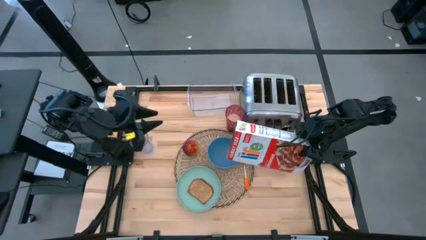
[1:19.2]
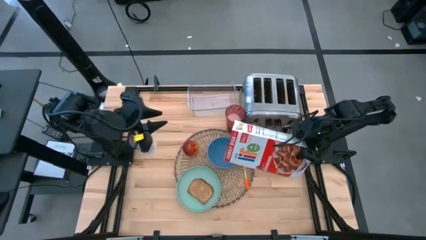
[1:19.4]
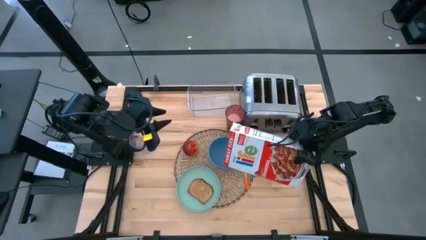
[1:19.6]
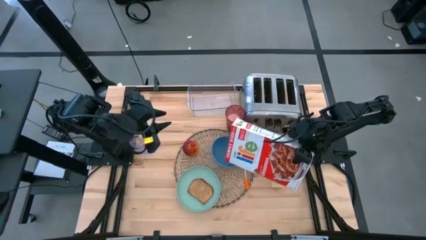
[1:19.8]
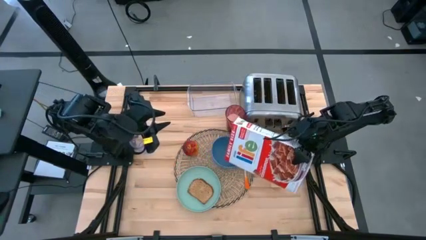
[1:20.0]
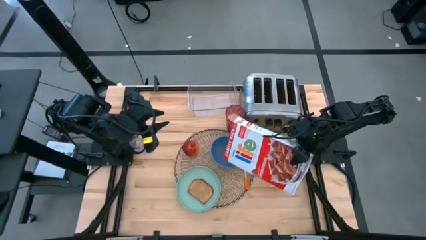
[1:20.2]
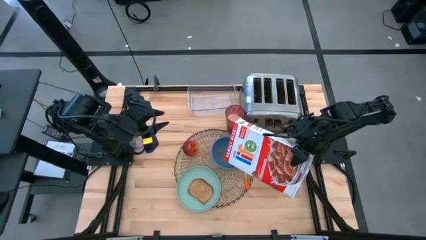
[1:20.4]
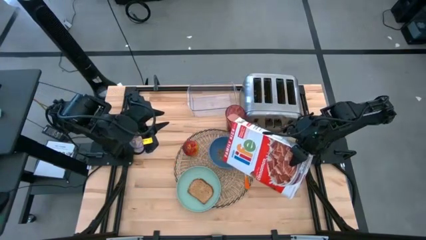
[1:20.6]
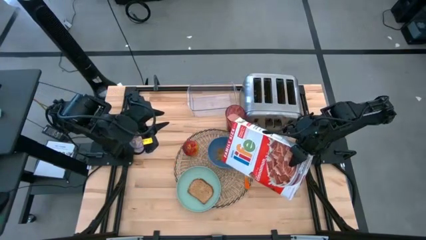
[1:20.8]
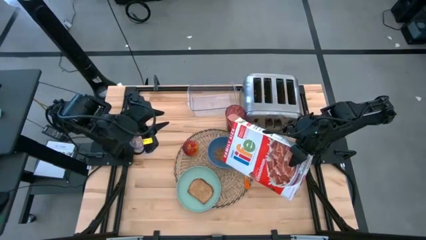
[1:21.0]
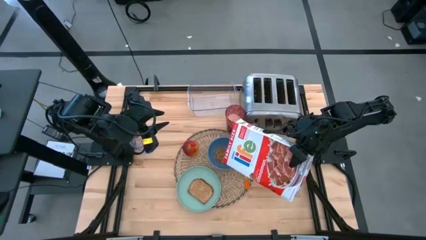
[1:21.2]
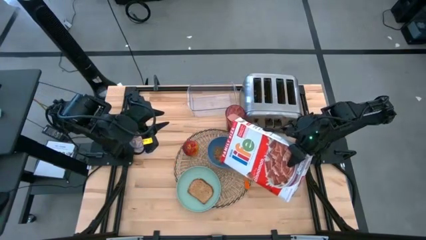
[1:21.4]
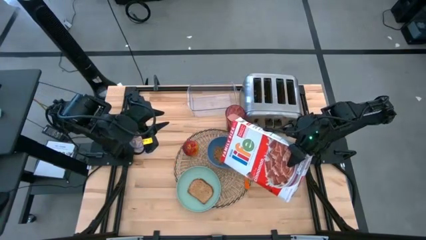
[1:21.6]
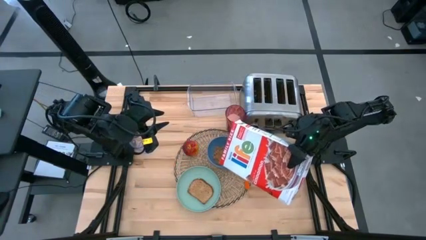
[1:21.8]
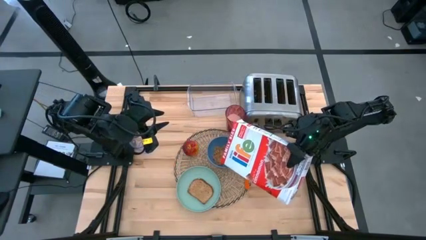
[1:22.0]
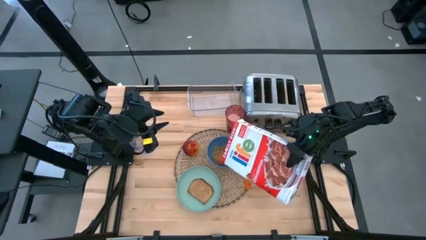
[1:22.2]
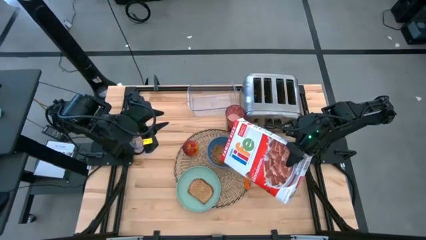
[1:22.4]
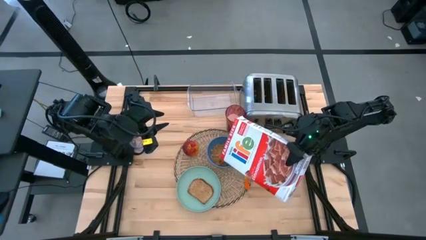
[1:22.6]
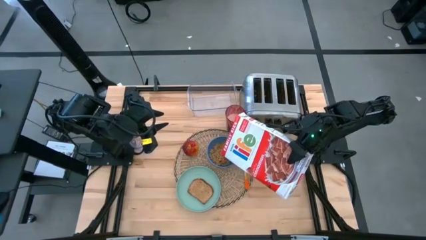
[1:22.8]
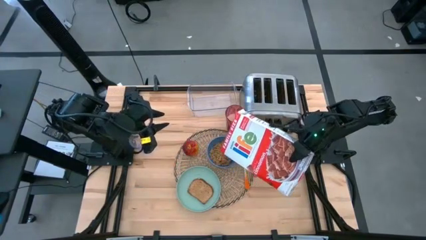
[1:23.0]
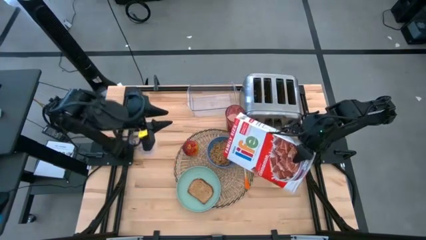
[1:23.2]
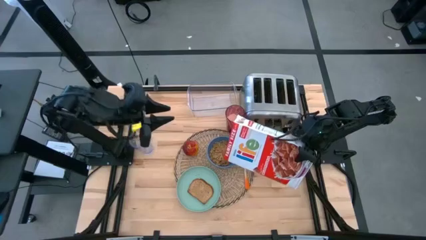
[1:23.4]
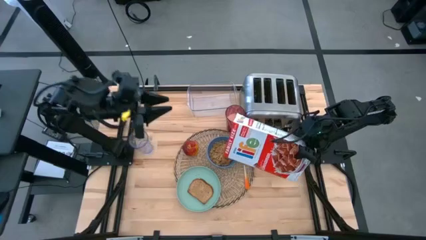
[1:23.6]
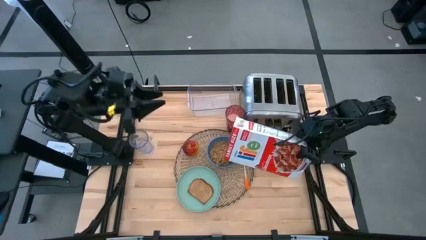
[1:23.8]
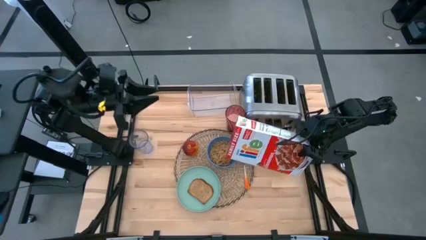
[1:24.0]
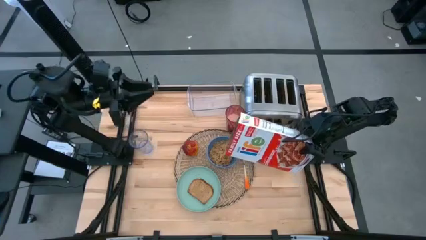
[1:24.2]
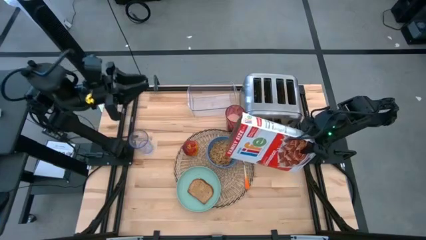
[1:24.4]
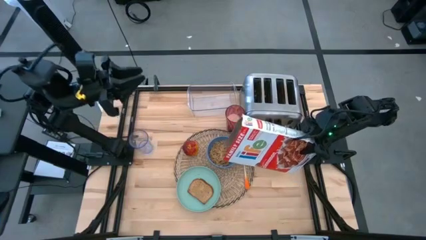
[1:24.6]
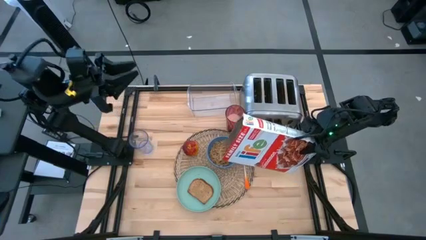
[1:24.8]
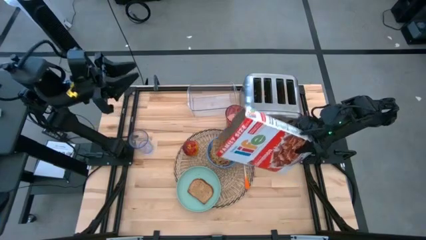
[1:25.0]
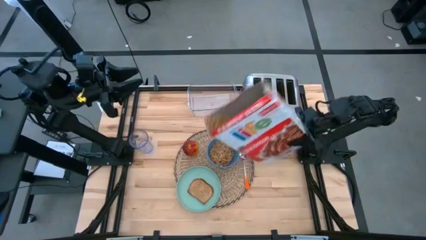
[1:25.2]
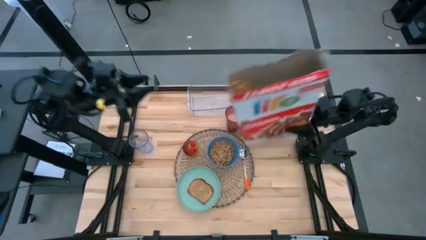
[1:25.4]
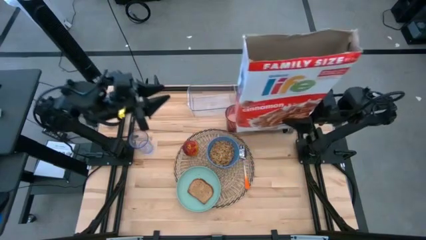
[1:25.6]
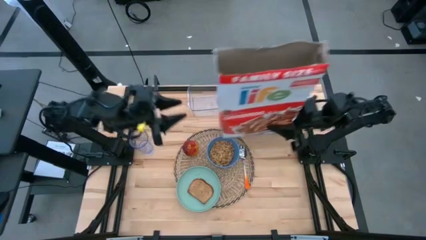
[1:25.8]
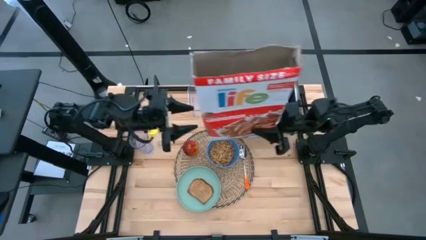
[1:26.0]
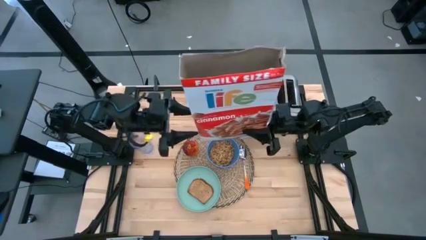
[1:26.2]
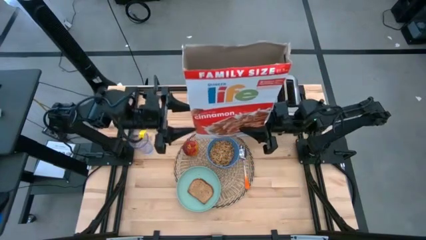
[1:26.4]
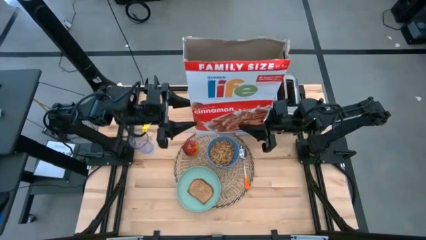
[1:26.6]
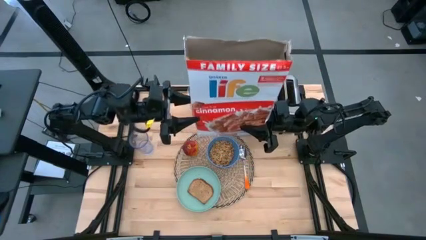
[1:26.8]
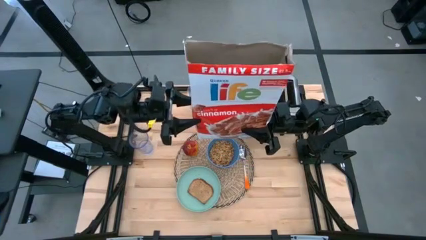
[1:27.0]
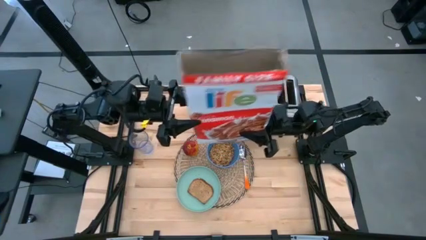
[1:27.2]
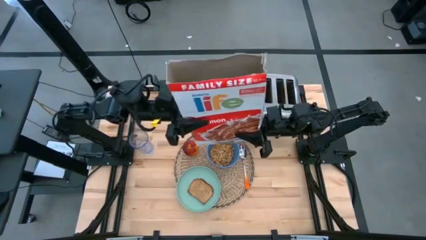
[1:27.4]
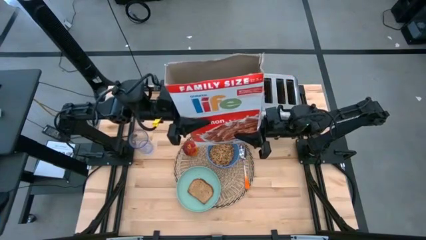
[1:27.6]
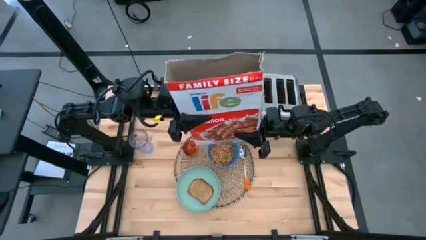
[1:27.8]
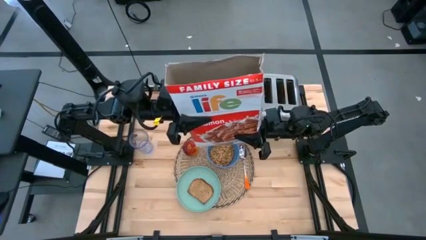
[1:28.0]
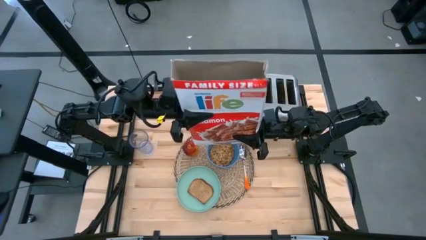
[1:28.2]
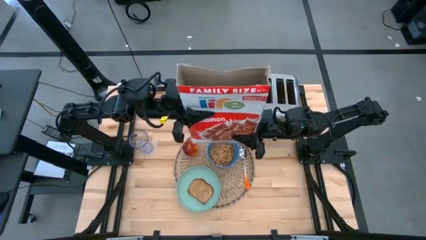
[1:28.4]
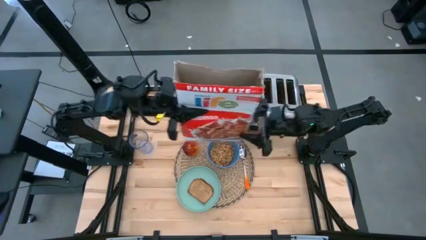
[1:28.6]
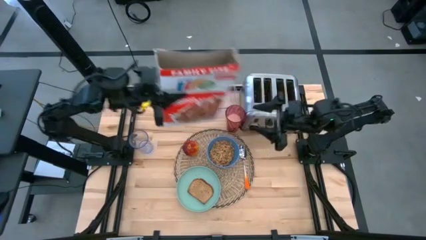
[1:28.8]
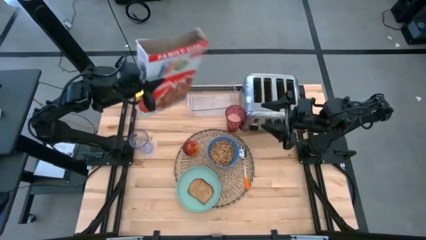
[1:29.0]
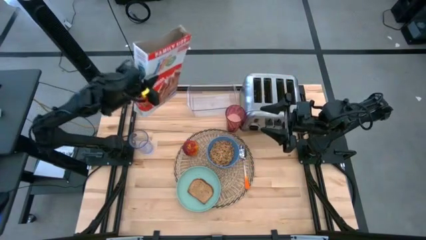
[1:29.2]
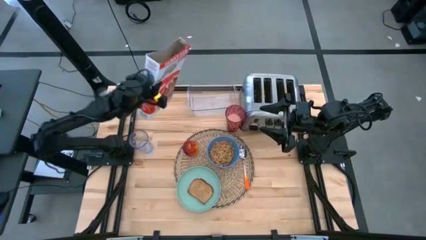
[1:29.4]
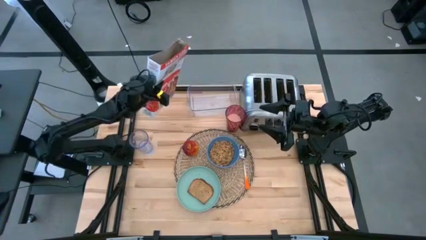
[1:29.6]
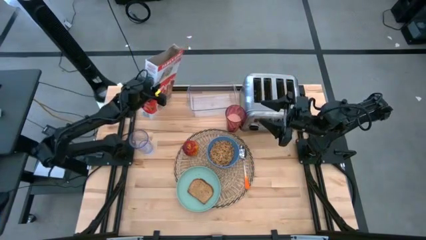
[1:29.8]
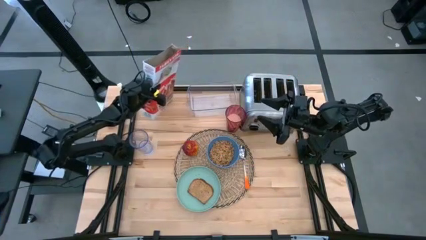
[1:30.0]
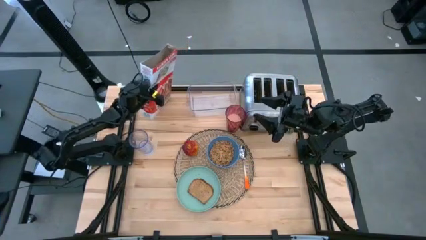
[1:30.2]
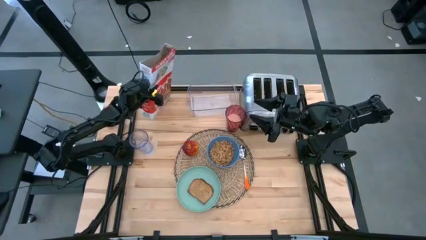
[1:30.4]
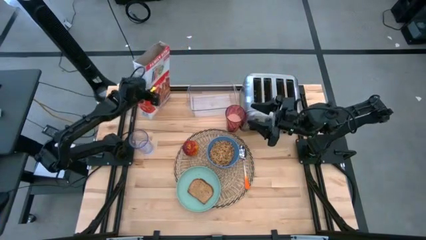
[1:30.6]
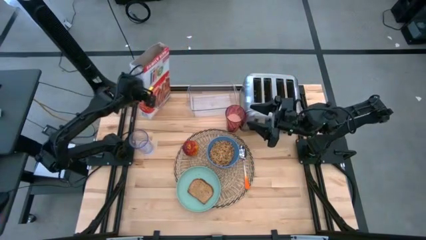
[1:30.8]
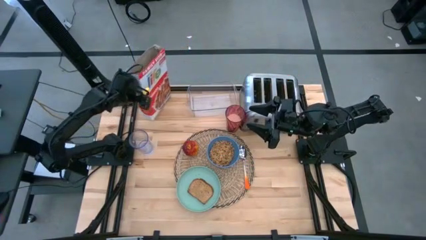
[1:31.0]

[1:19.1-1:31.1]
Task: Arrange a breakfast setting
Pour the cereal on the blue bowl from the white cereal box

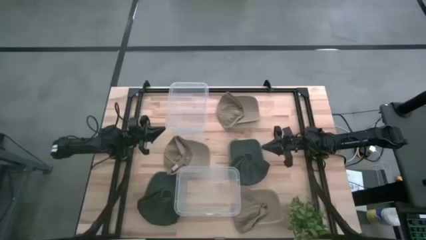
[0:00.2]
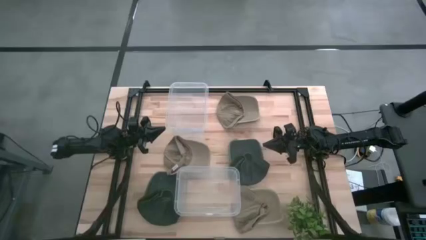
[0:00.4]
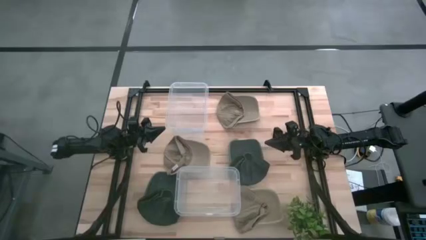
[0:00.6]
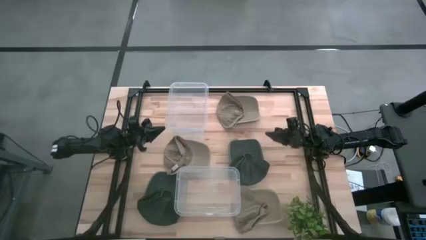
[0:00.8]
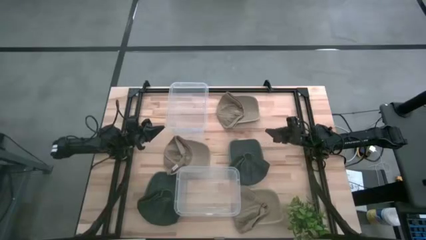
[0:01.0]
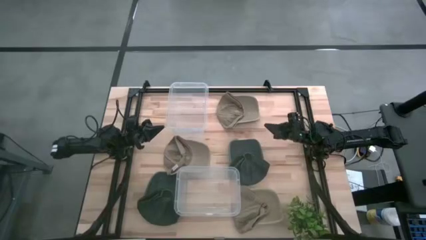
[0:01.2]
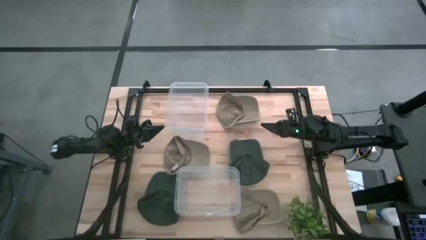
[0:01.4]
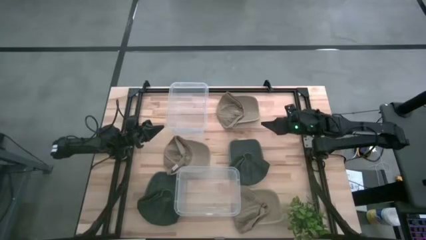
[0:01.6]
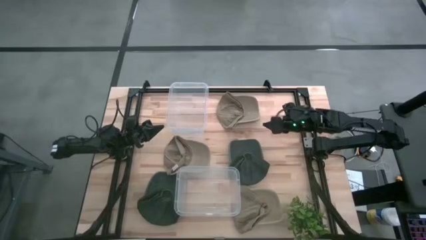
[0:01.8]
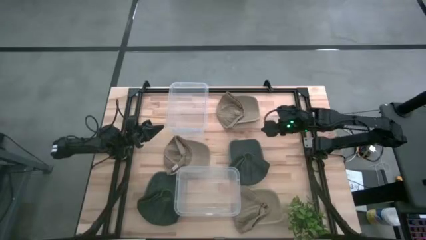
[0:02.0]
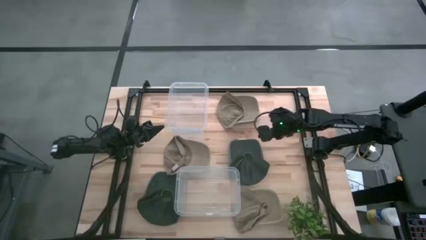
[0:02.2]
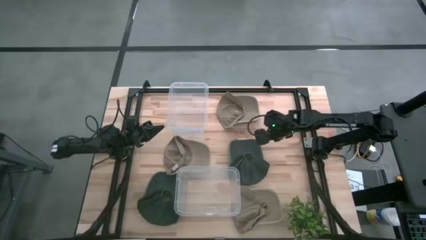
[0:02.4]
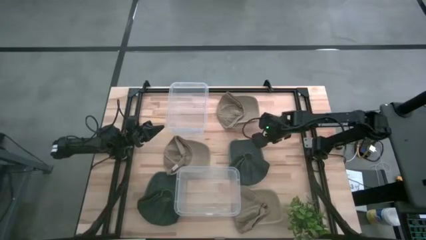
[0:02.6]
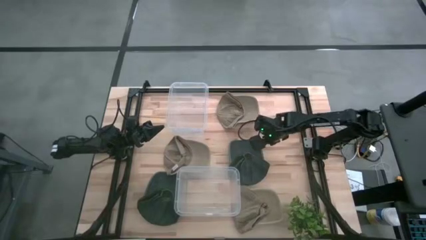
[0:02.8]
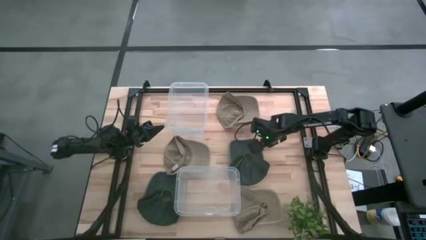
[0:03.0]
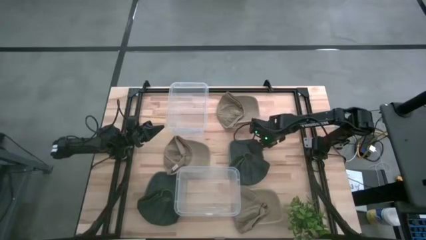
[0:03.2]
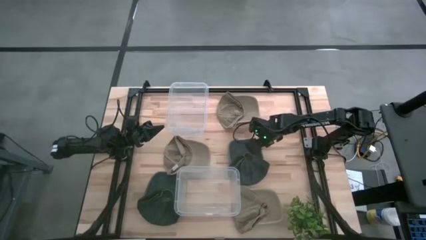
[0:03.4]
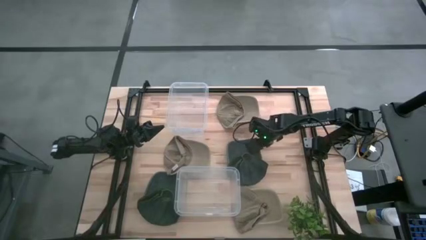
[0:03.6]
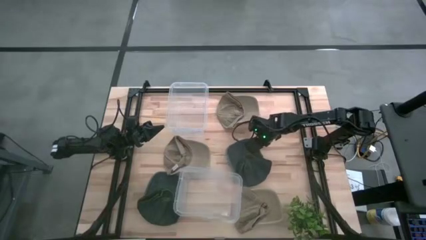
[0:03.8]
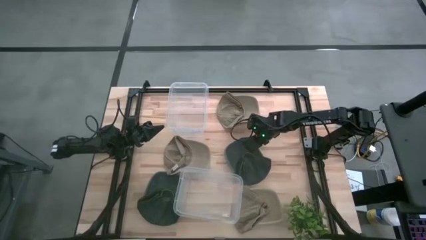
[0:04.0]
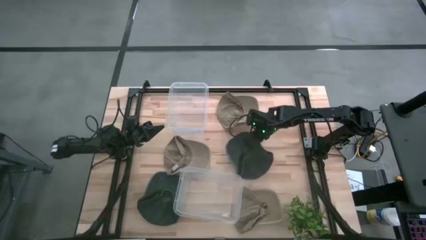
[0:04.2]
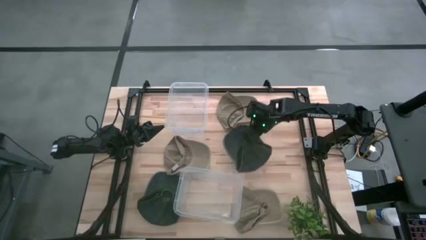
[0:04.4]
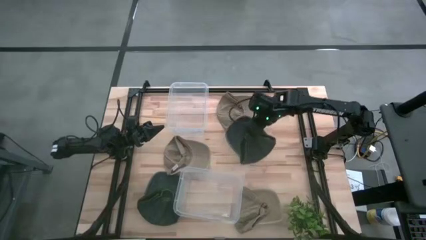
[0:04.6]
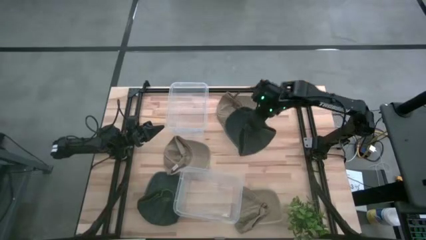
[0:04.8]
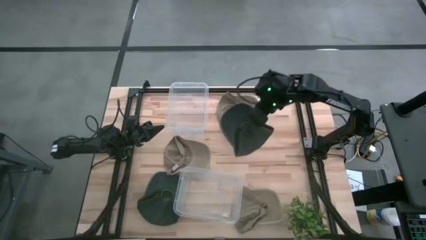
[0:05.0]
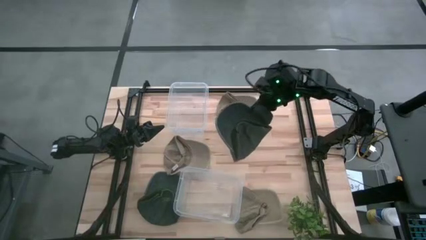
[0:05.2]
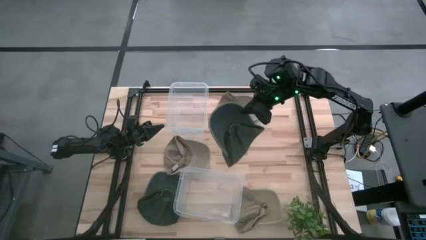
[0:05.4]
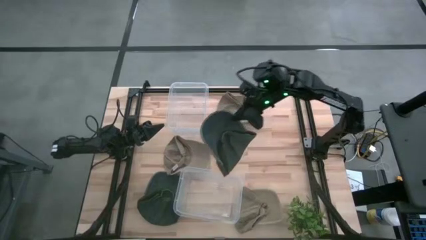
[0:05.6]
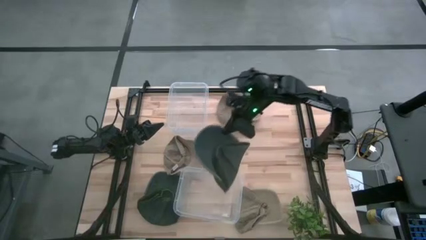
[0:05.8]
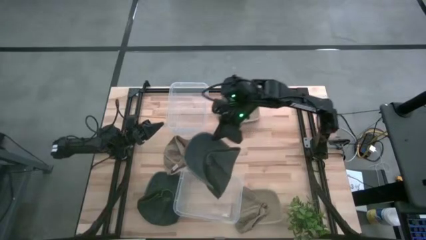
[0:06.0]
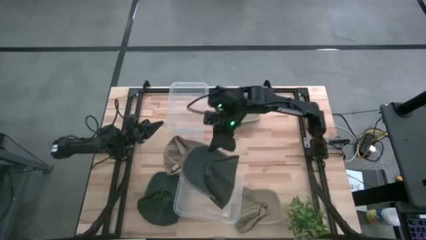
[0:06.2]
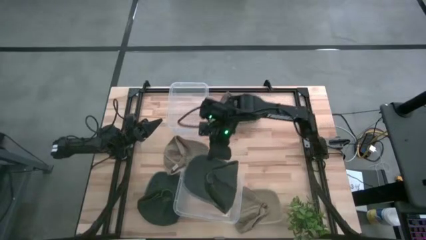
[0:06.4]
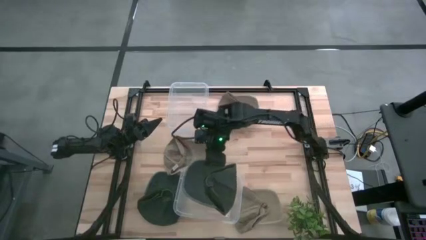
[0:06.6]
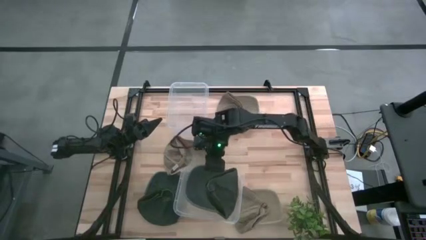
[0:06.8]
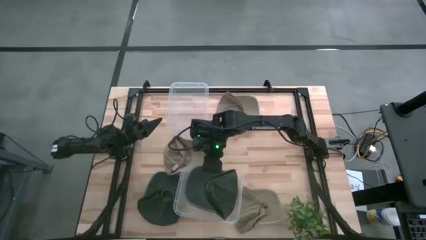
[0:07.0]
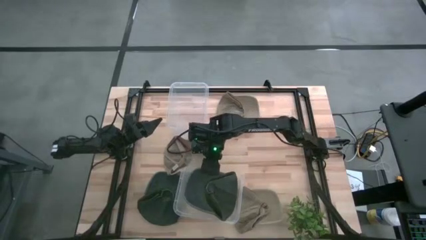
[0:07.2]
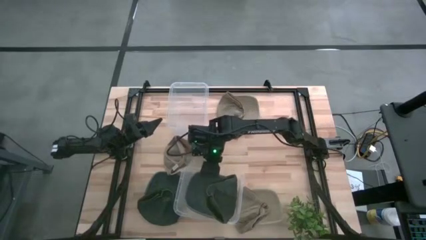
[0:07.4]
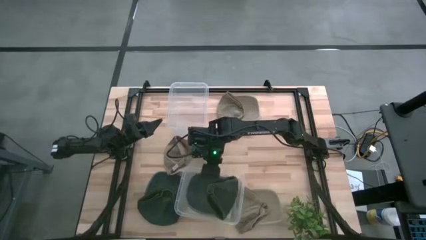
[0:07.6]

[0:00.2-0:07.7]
Task: Pick & Place hat
Put the top blue cap into the bottom transparent bin
